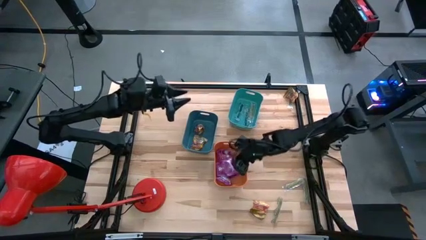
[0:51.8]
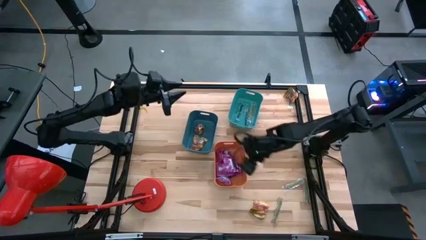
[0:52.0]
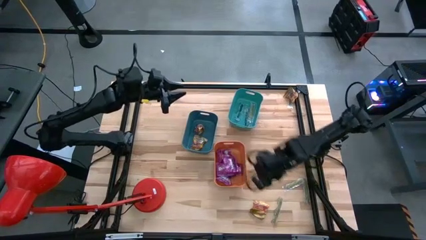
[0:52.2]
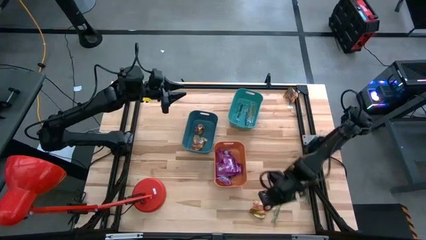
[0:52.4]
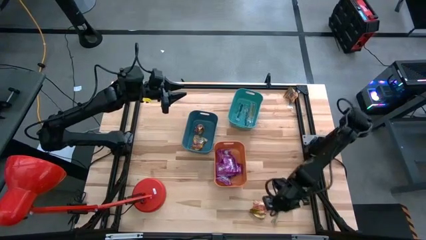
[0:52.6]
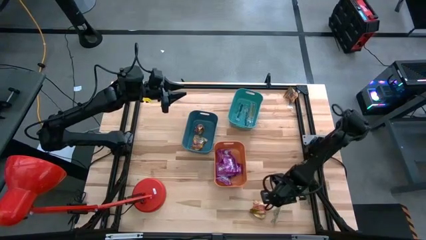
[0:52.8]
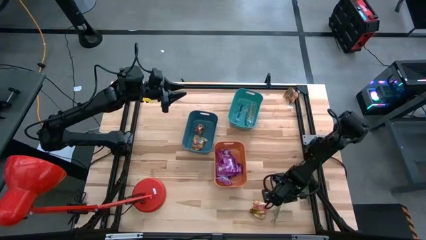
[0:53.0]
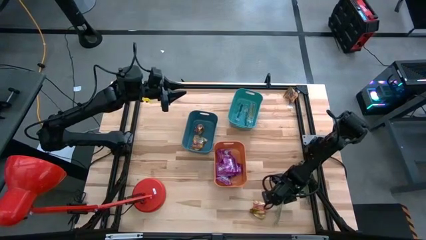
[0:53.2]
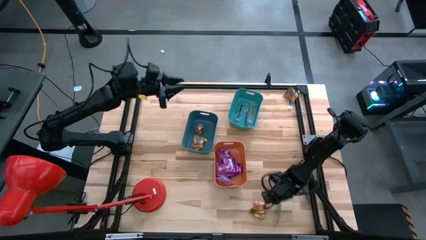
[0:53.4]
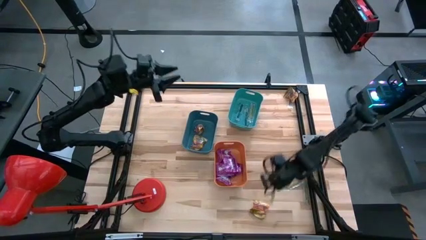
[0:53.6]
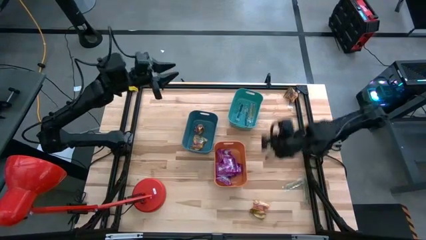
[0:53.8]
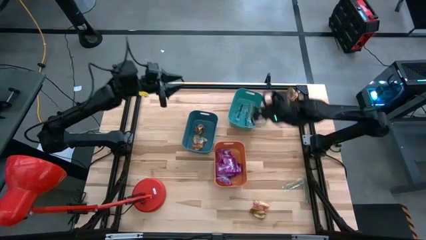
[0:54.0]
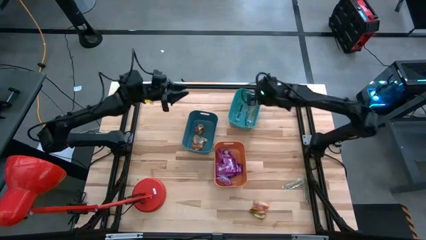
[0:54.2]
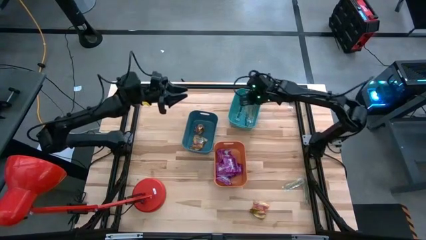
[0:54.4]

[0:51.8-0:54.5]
Task: Sort candy
Put the green gummy into the green bin

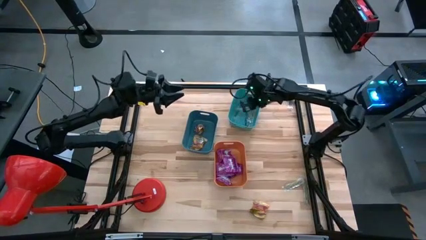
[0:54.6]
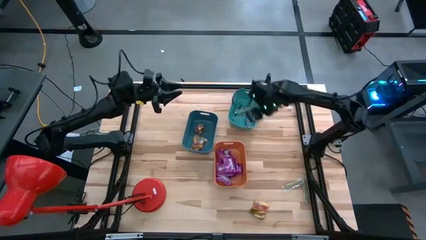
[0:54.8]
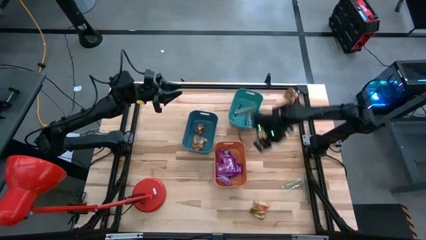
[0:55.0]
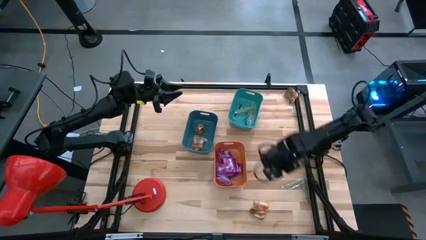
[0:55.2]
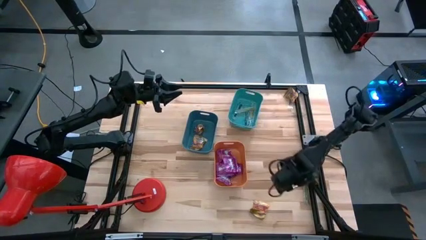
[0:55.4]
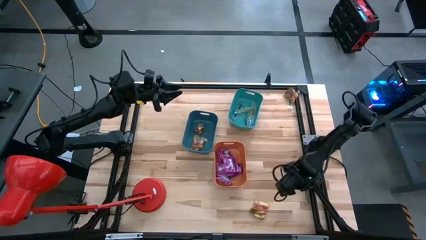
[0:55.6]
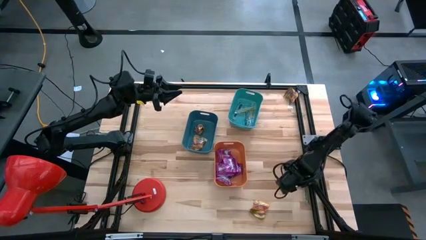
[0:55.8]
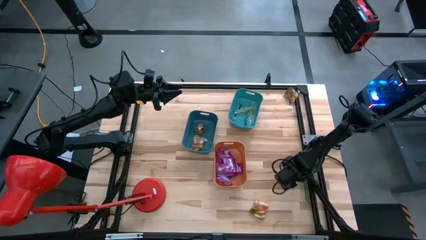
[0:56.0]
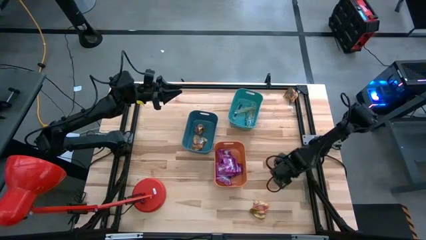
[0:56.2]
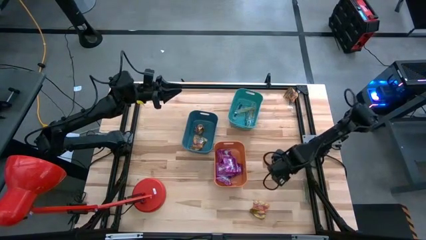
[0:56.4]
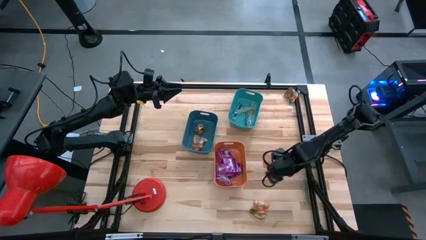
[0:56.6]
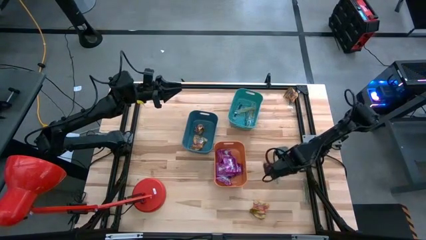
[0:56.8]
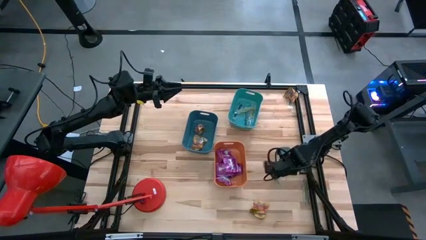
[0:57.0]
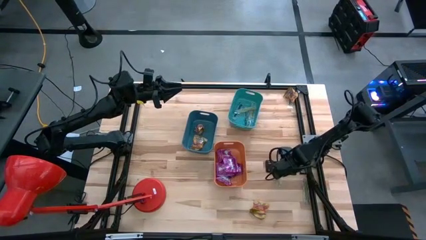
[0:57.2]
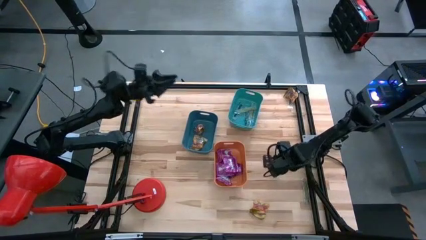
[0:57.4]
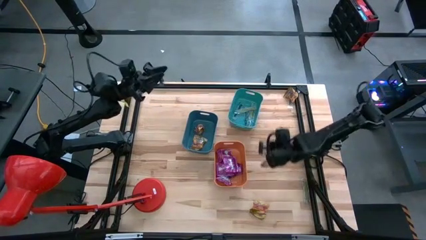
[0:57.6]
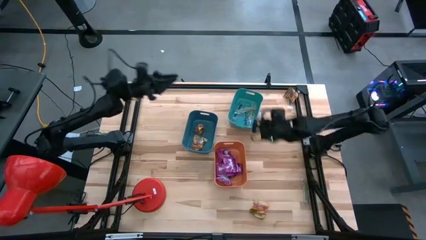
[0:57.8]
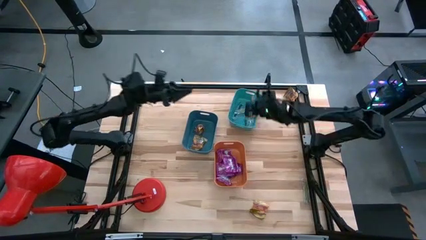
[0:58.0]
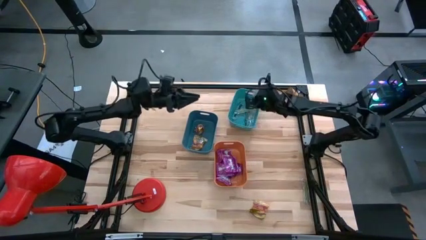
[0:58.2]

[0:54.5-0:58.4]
Put the green gummy into the green bin

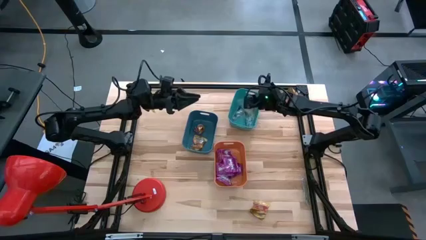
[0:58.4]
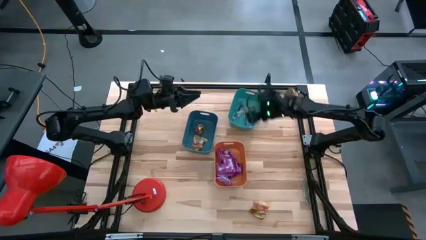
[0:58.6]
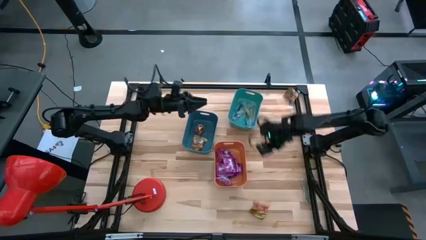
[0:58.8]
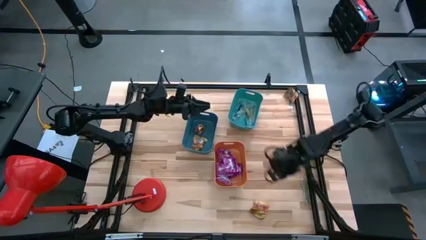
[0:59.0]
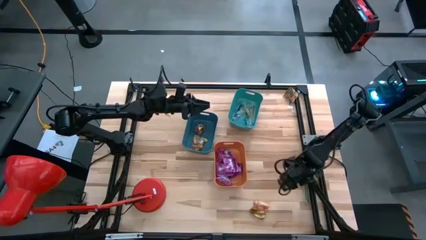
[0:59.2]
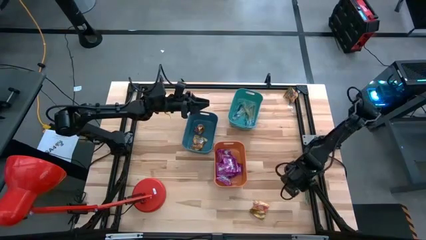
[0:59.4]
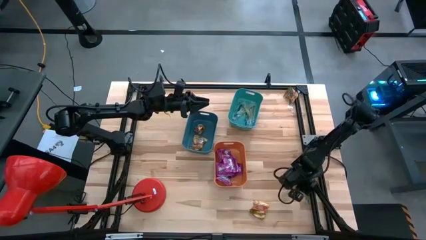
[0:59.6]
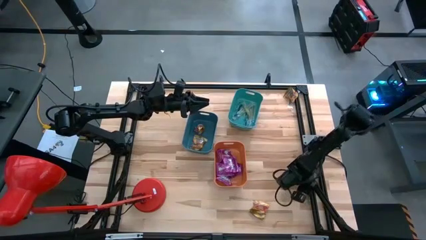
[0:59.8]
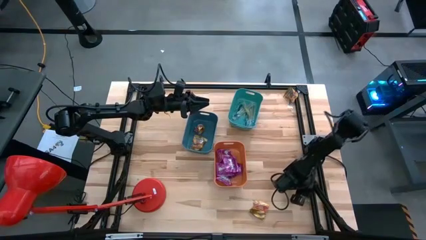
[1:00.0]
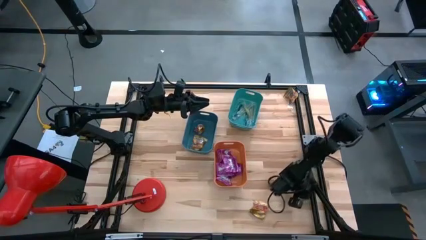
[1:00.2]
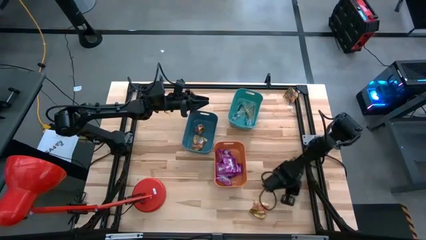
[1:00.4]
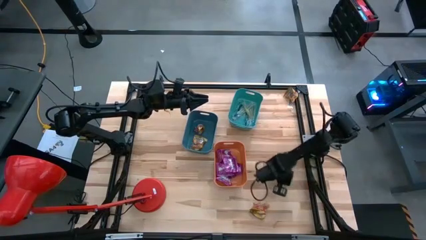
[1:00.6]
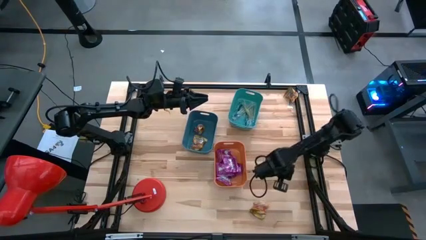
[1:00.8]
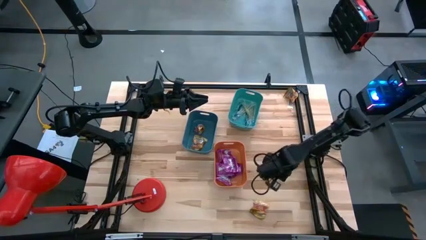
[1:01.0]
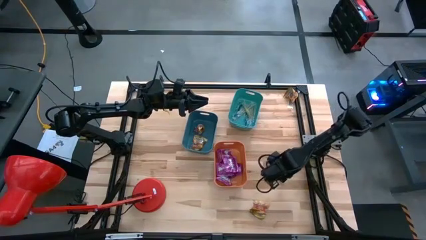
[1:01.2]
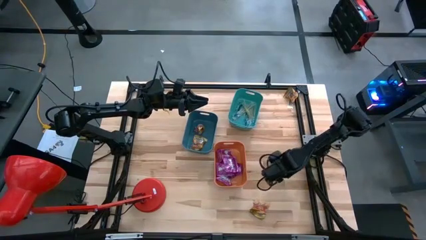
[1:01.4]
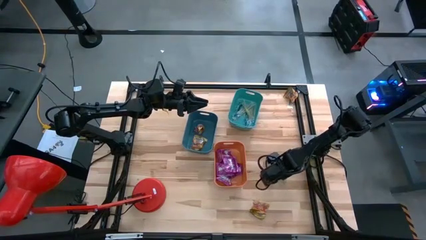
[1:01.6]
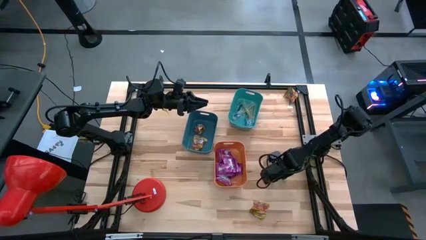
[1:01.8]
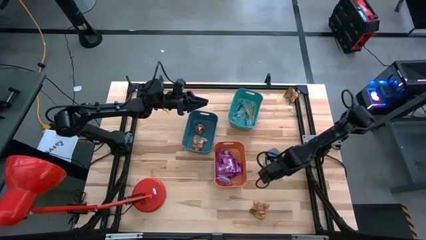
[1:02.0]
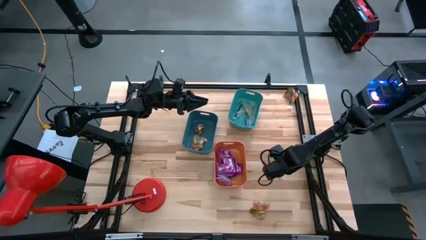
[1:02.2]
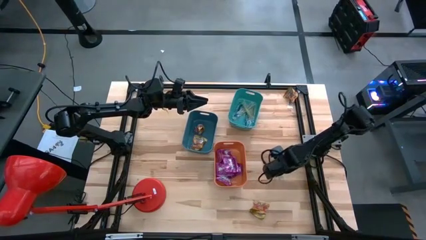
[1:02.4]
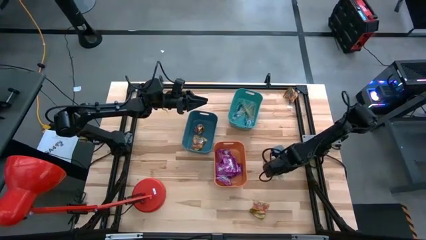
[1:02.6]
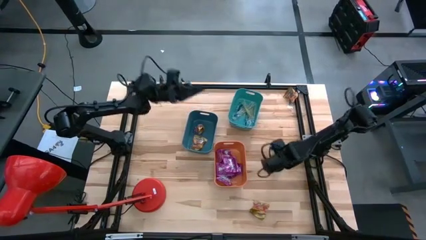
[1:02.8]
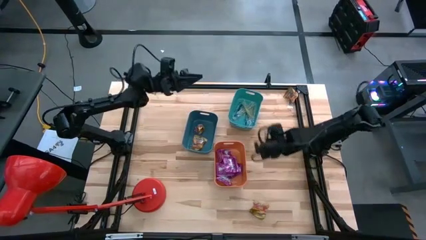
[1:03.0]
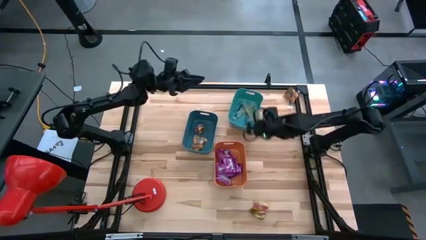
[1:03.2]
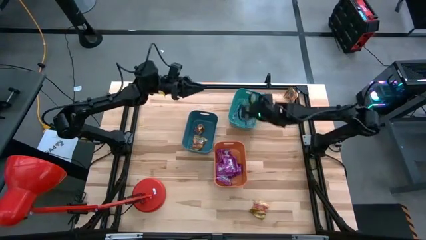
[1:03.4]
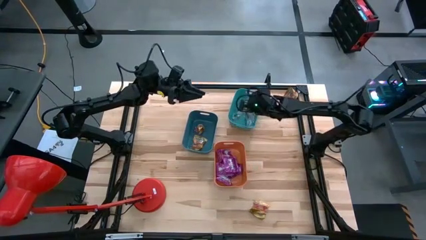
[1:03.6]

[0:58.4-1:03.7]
Put the green gummy into the green bin

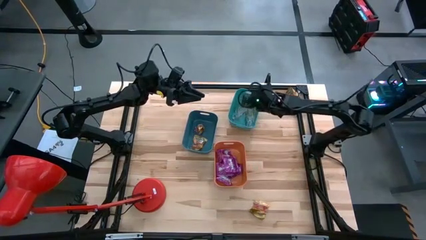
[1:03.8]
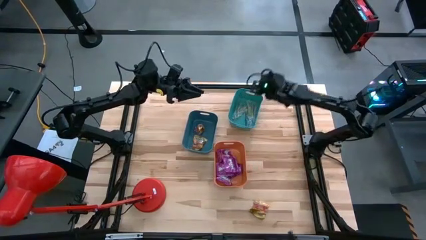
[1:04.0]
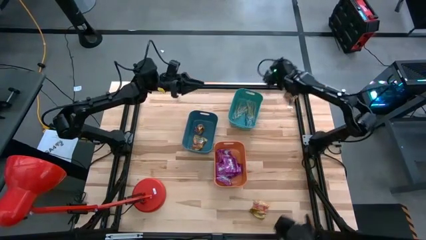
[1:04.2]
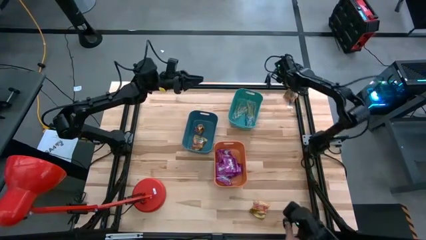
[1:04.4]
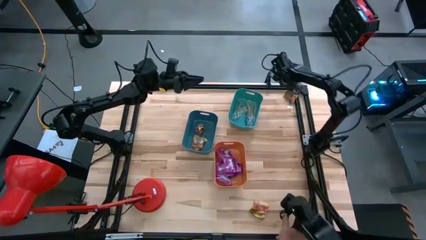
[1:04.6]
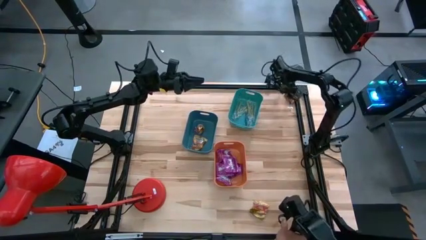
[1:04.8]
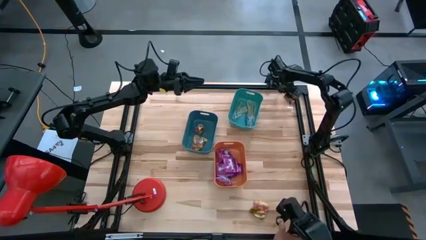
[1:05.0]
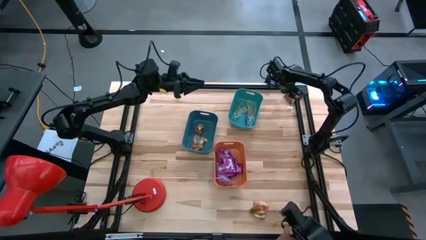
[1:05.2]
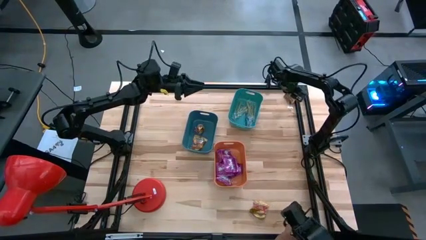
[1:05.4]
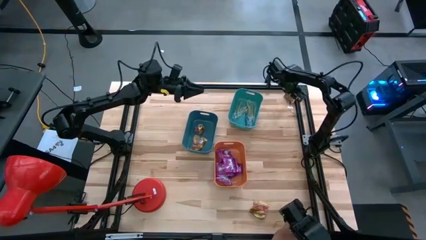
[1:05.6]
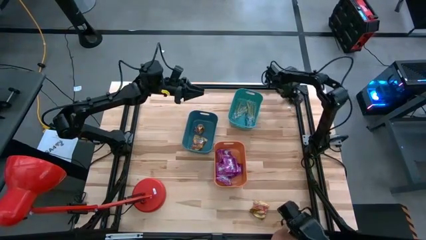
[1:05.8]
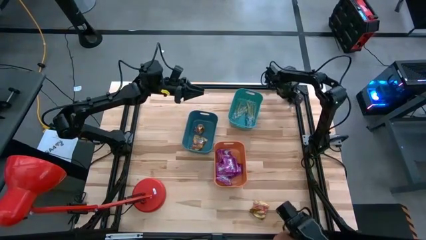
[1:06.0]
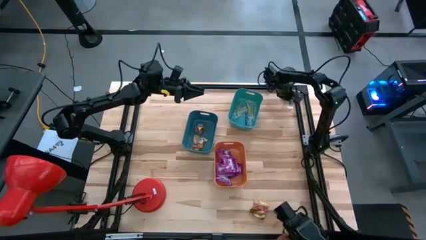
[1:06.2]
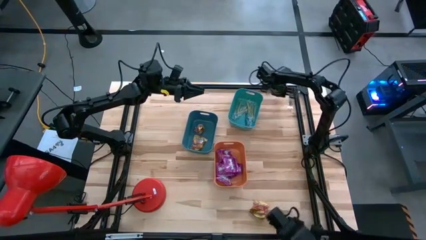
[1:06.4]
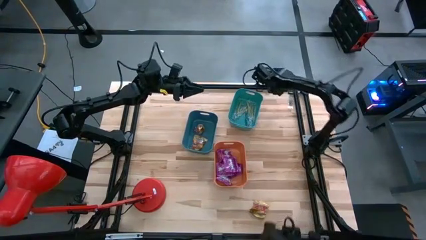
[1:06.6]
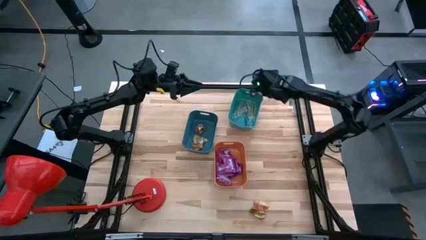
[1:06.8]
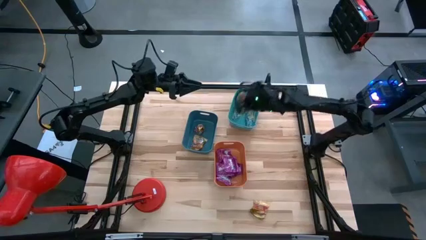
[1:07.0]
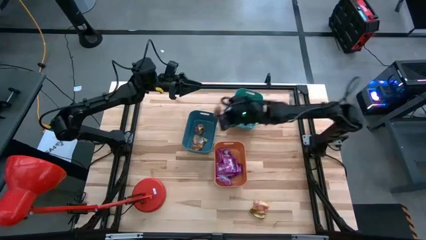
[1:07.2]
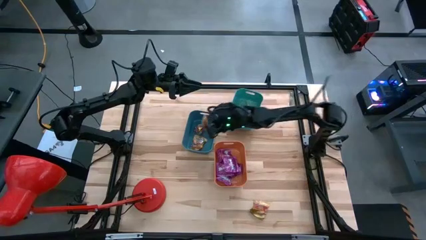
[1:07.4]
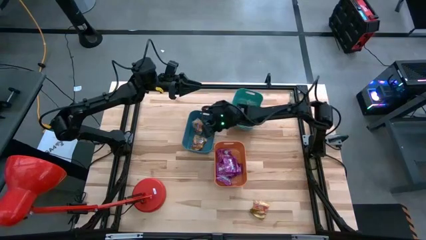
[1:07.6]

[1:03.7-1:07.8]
Put the yellow candy into the blue bin
